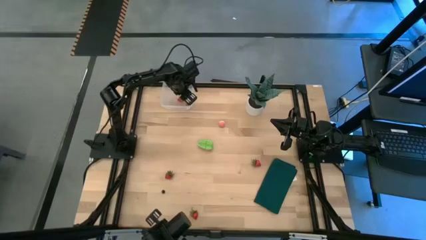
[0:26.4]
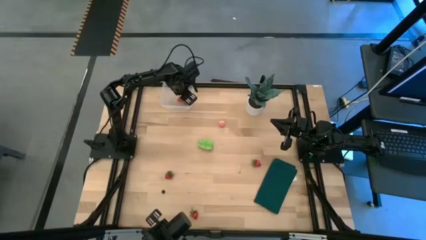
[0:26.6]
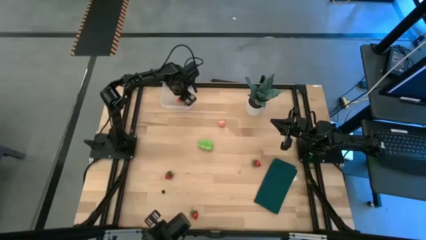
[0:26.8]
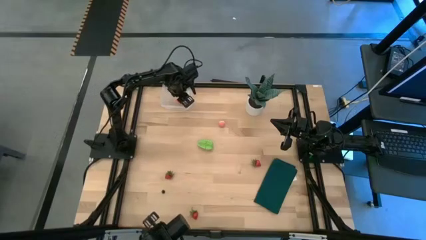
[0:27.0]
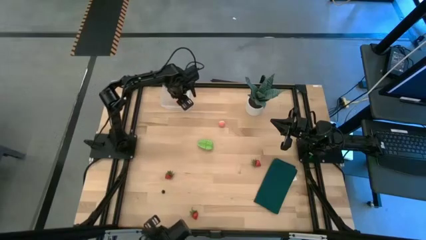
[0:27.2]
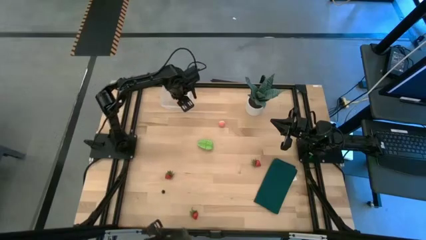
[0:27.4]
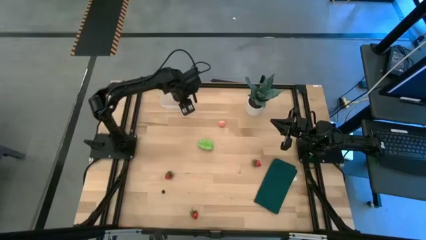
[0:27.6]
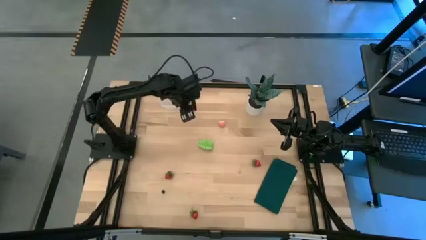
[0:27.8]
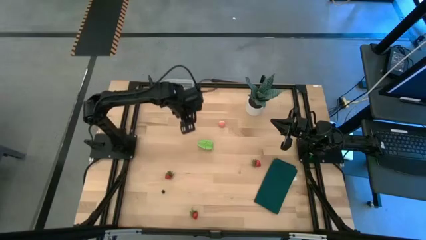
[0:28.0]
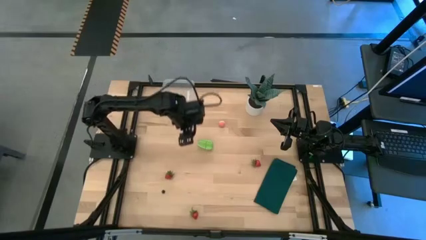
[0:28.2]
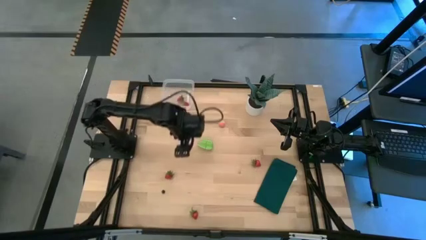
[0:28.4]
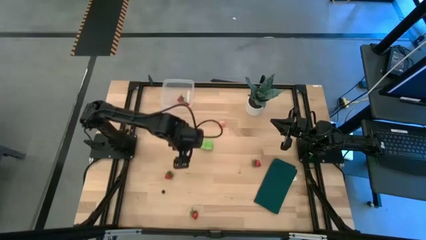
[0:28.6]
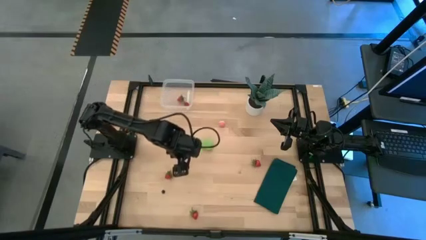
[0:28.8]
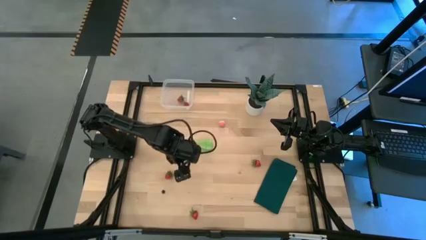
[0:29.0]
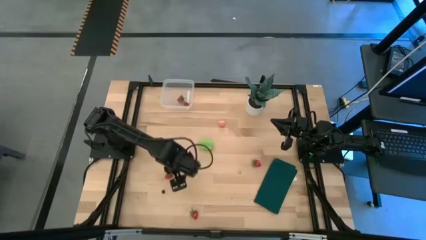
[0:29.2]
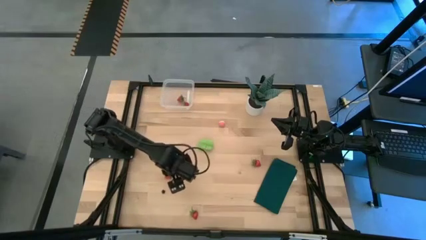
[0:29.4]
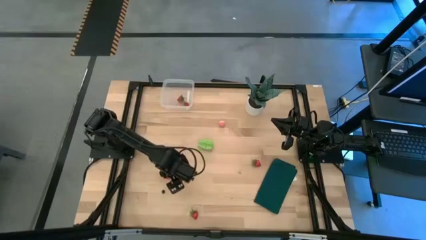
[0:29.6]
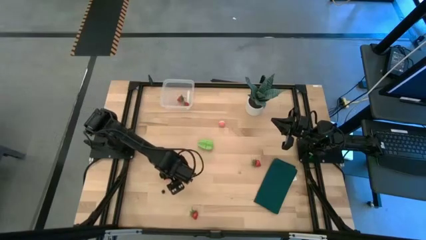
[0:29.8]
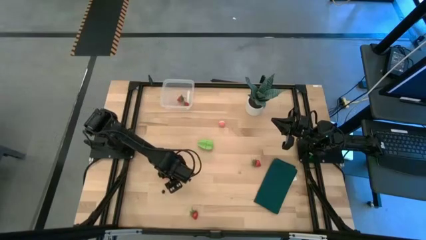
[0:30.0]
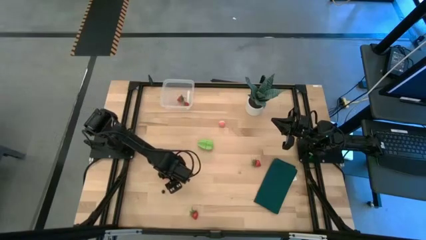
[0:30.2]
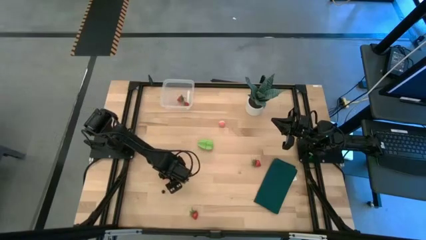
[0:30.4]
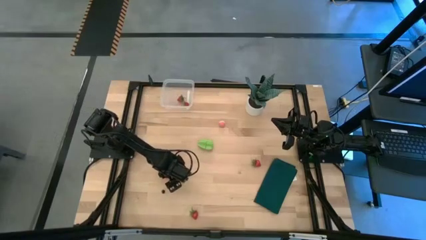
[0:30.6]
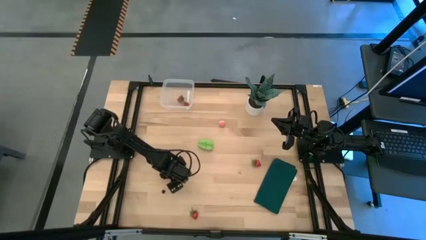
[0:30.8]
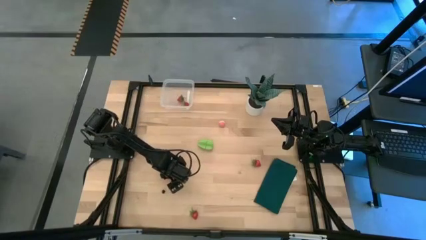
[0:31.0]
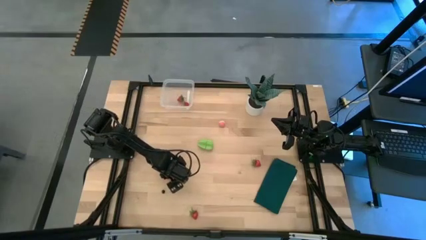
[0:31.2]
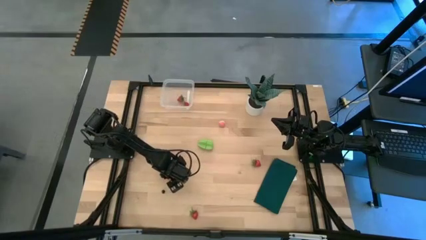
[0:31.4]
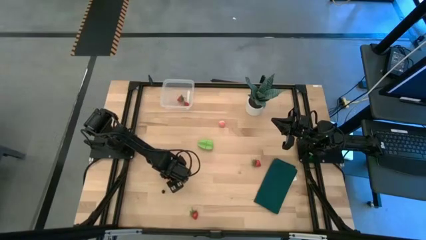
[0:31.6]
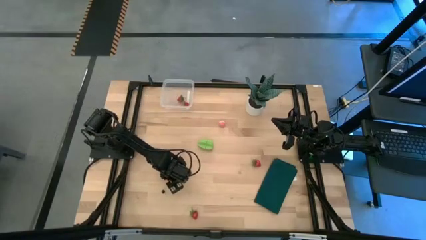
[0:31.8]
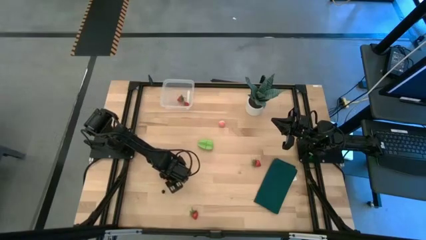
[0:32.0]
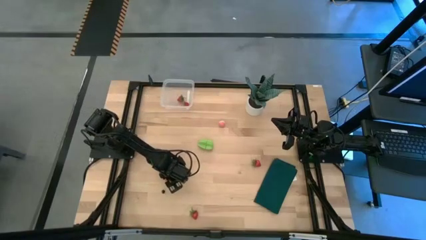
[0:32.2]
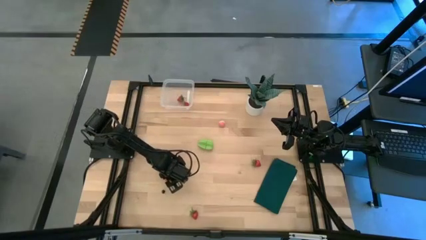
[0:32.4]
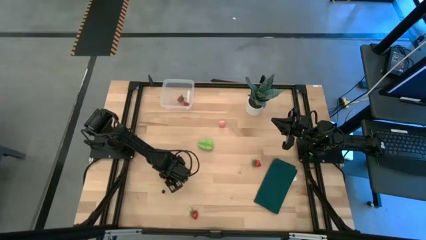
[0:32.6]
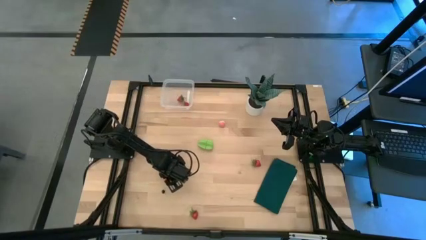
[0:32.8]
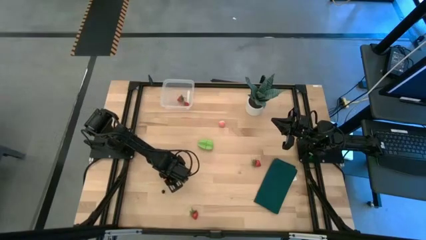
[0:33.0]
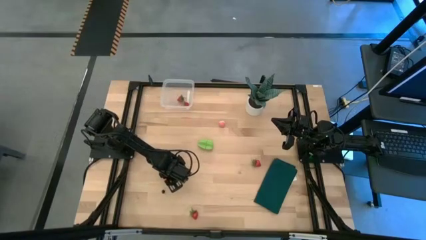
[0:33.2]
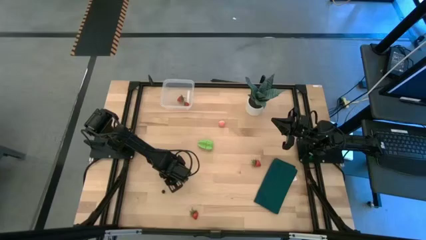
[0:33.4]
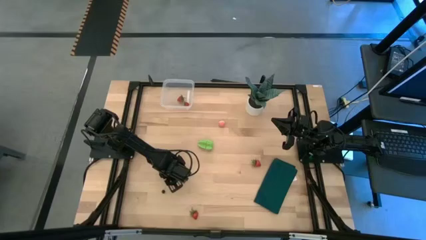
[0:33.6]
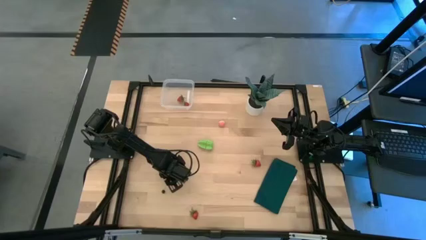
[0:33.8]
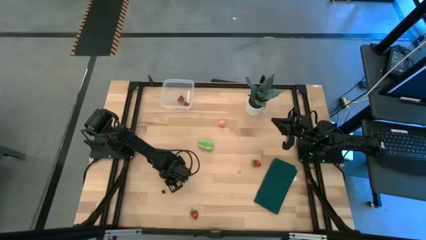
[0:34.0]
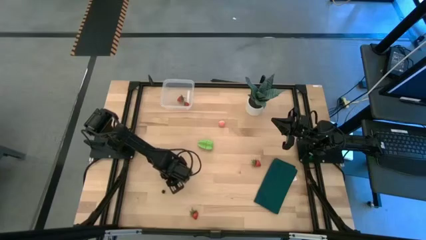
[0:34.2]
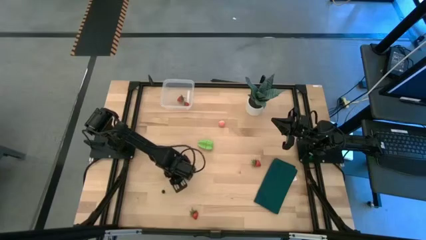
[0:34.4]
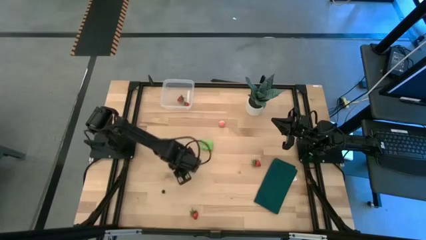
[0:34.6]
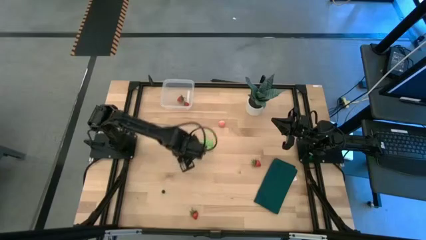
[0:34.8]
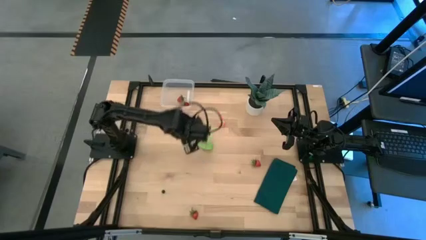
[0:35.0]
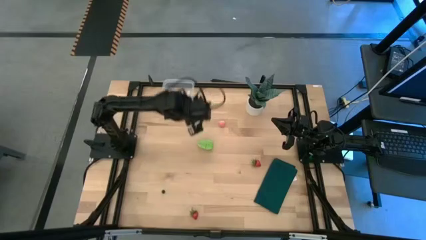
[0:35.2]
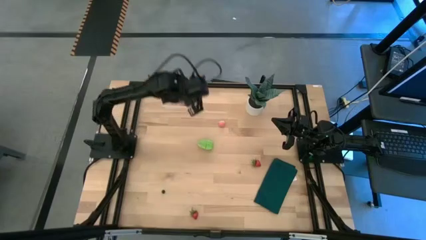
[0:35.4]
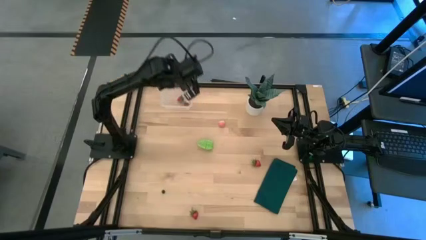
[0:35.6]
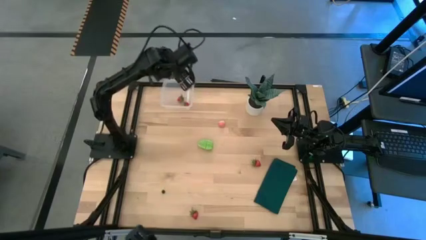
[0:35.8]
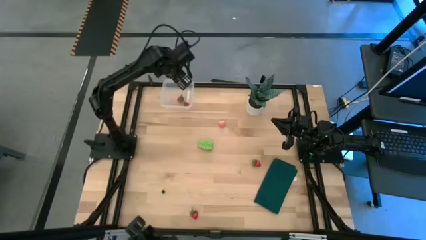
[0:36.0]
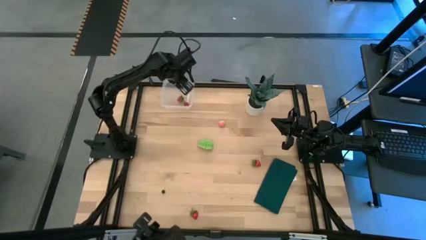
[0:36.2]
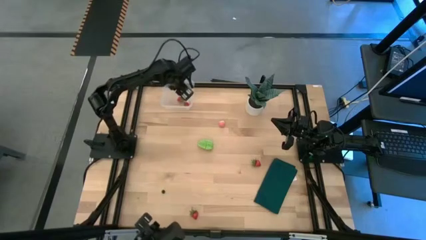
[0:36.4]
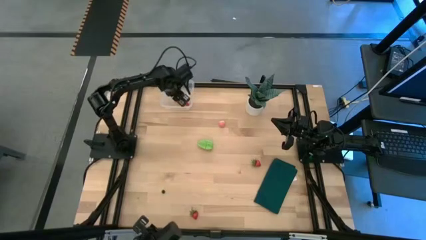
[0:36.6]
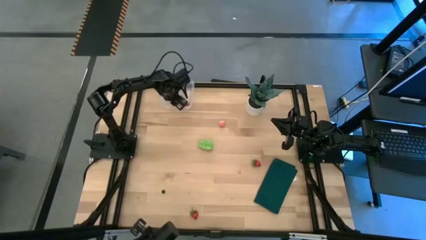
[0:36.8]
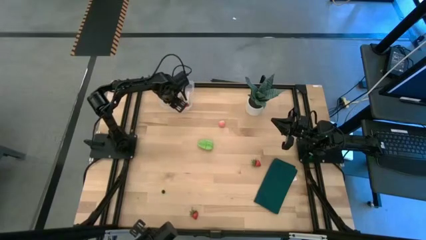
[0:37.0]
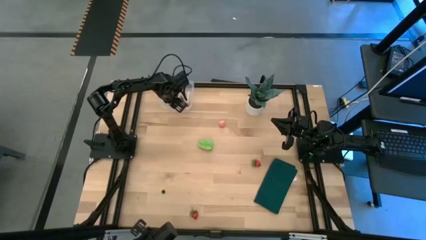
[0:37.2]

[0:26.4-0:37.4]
Task: Pick and placing Produce into tupperware
Put the red strawberry into the transparent container
